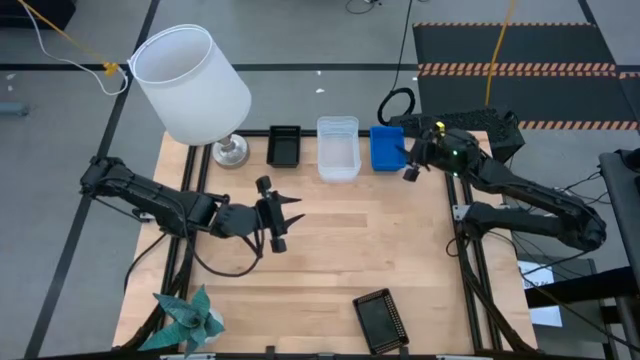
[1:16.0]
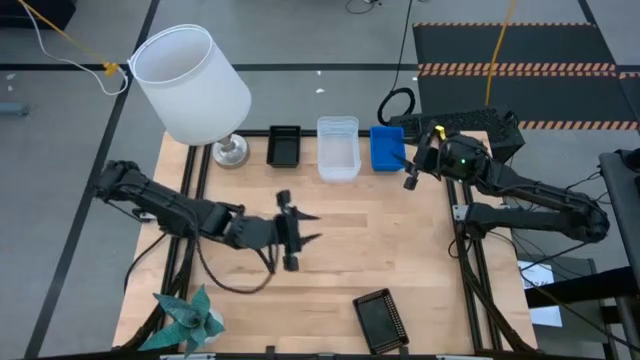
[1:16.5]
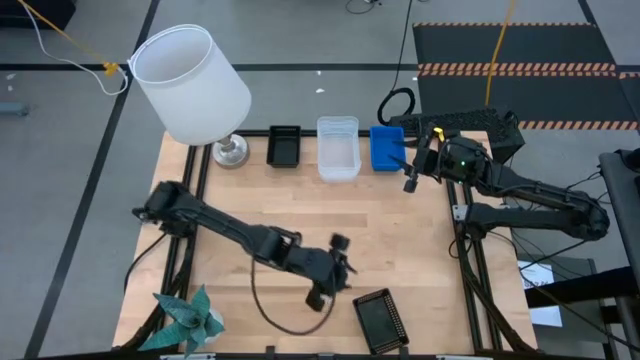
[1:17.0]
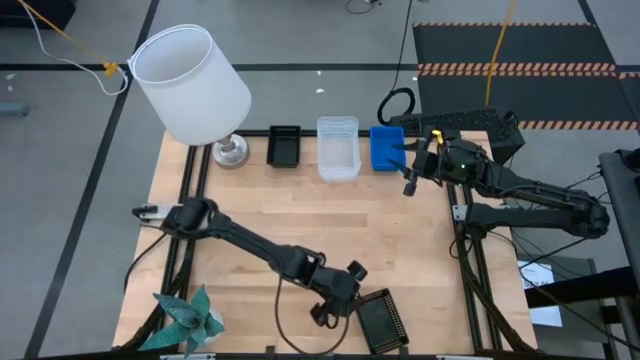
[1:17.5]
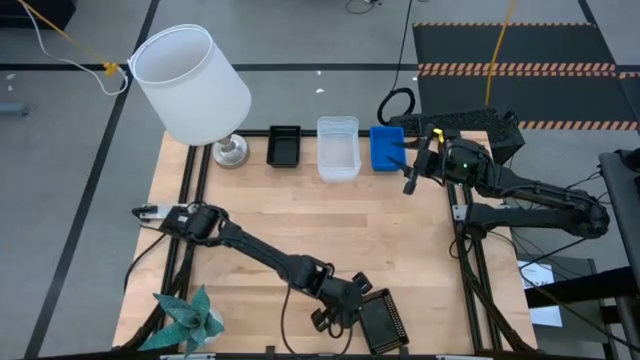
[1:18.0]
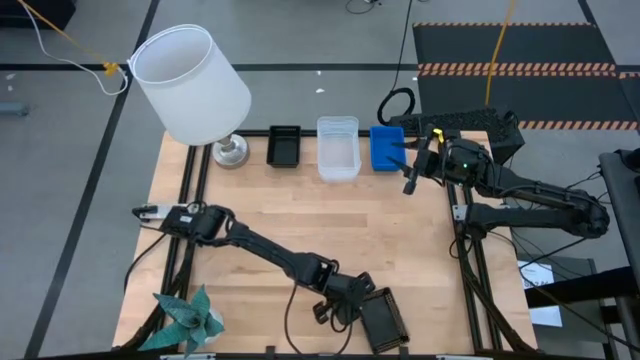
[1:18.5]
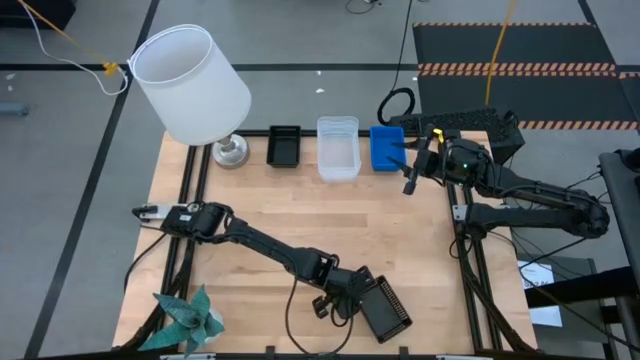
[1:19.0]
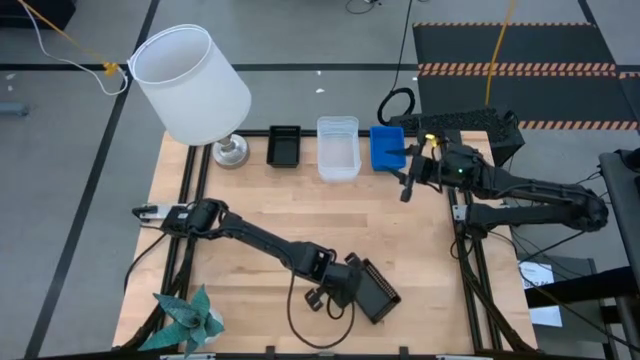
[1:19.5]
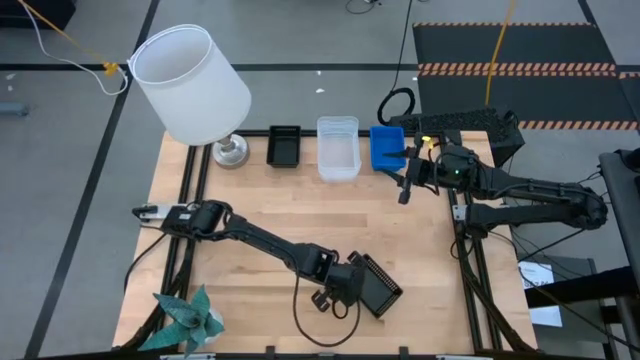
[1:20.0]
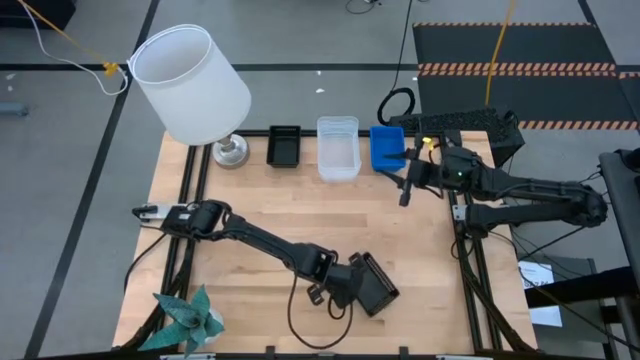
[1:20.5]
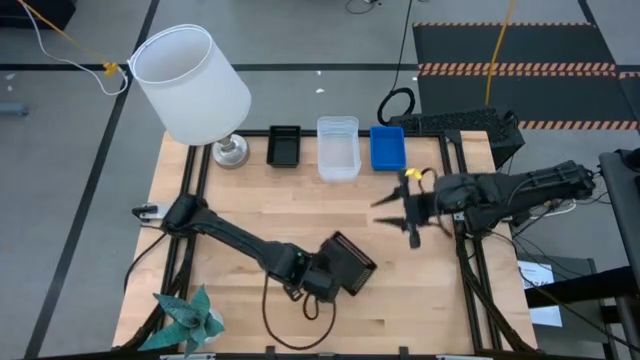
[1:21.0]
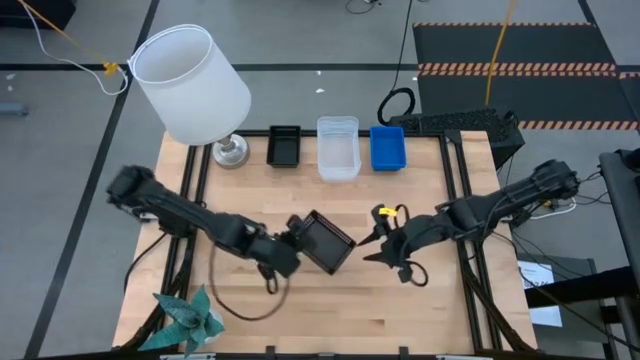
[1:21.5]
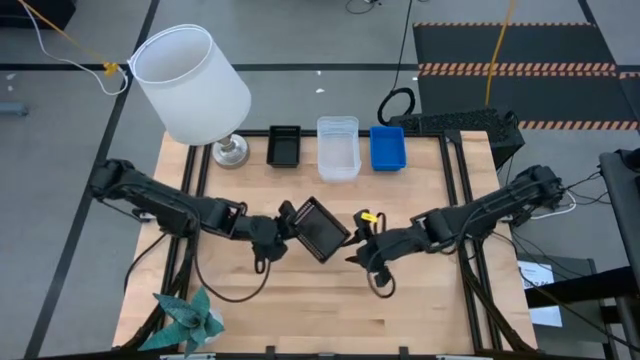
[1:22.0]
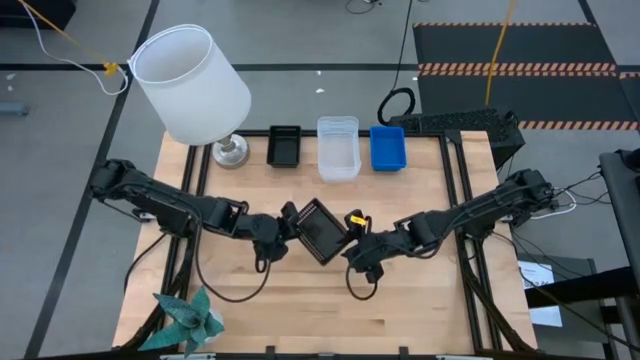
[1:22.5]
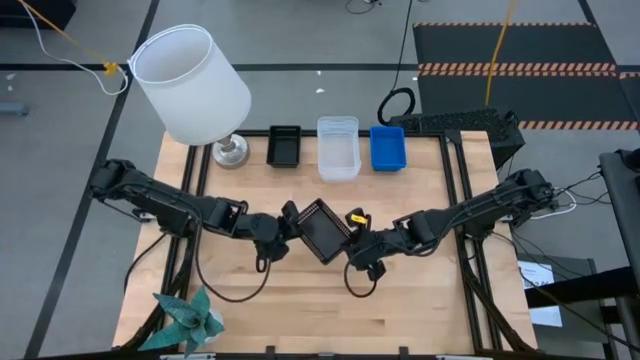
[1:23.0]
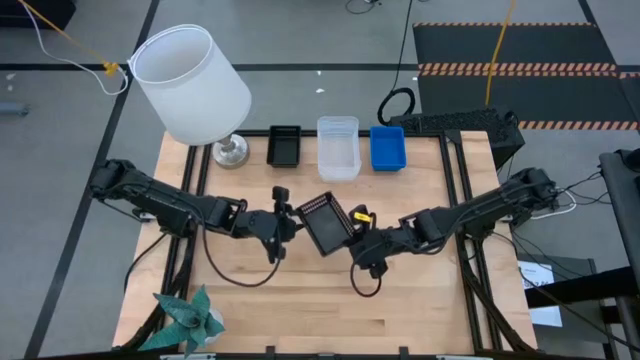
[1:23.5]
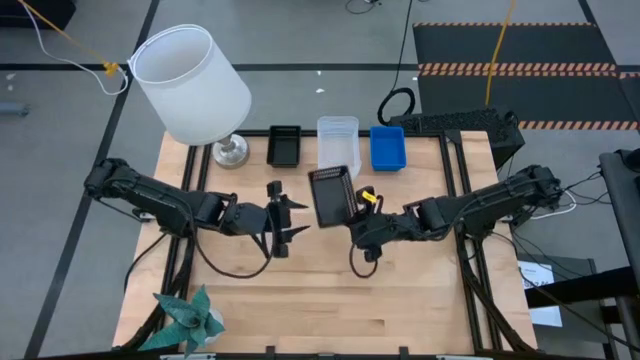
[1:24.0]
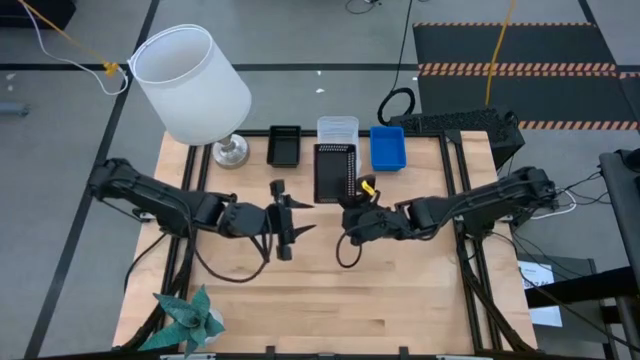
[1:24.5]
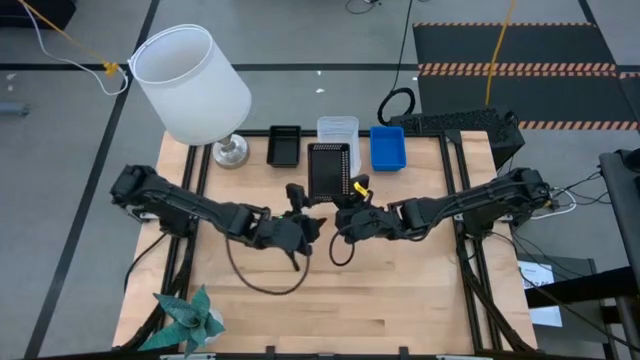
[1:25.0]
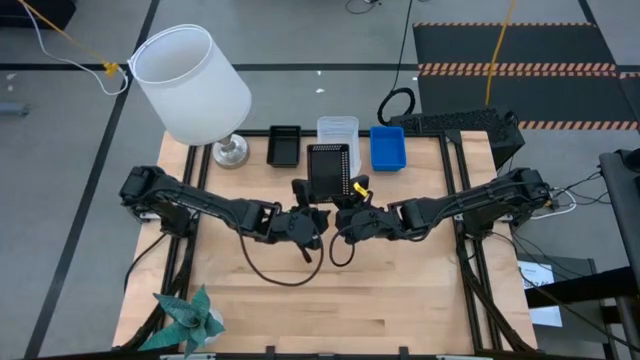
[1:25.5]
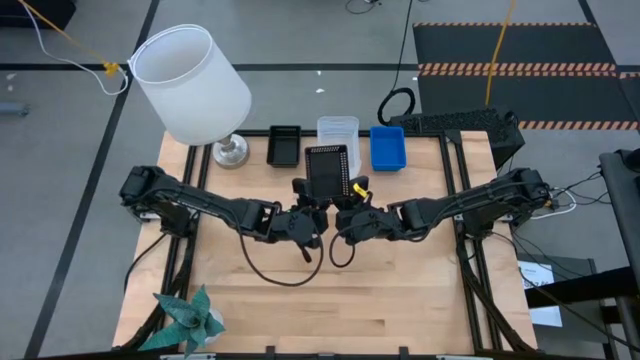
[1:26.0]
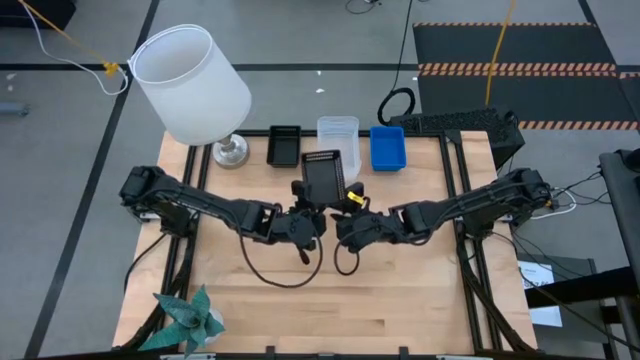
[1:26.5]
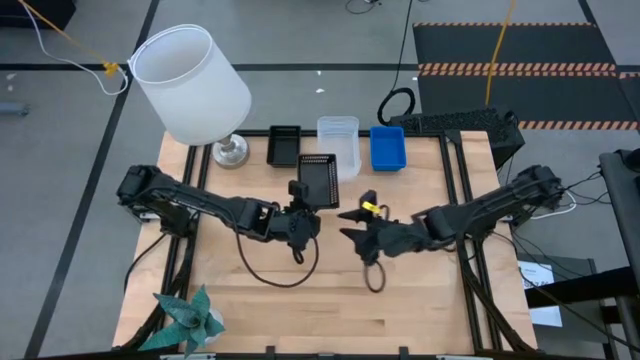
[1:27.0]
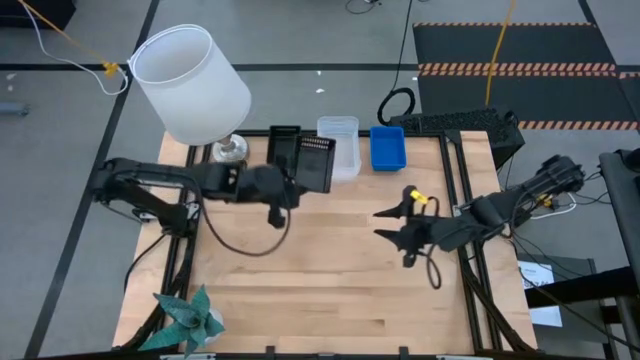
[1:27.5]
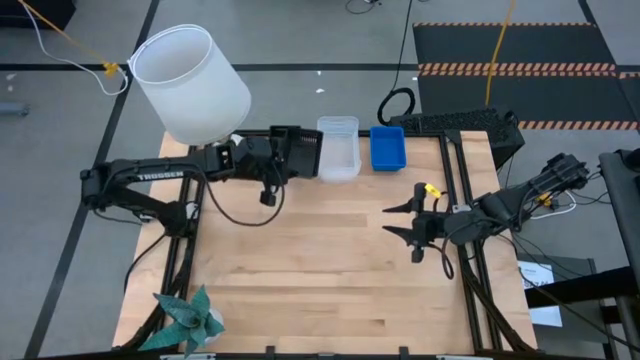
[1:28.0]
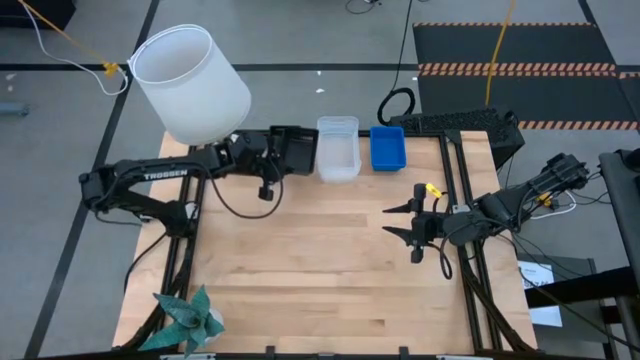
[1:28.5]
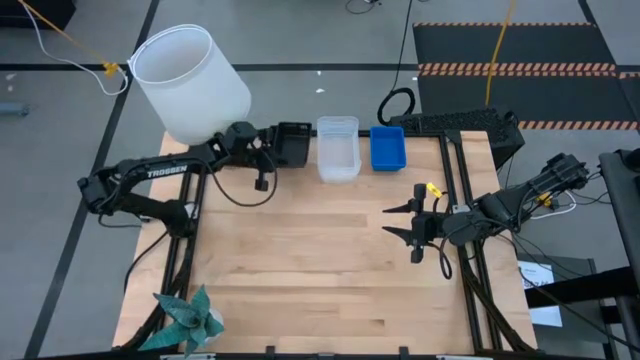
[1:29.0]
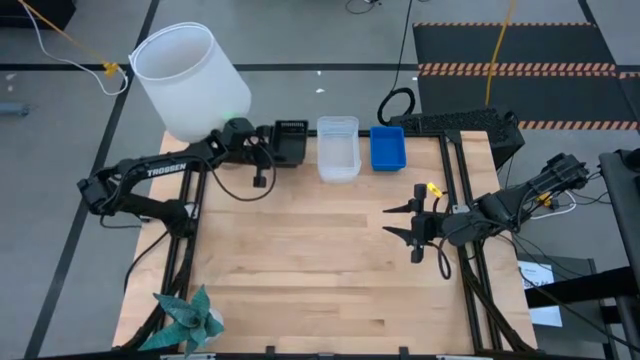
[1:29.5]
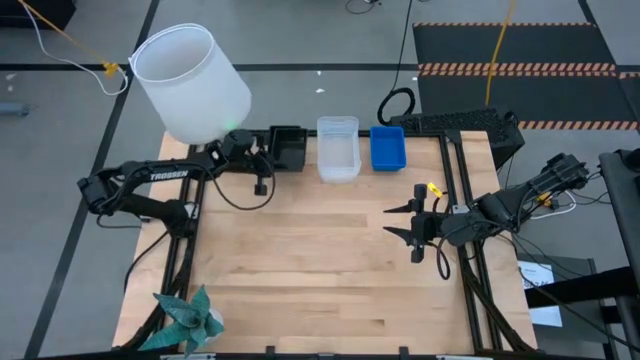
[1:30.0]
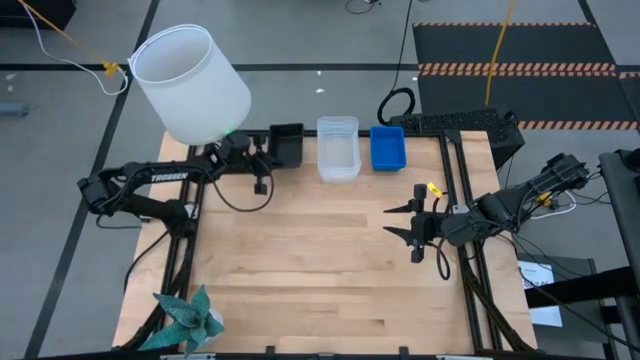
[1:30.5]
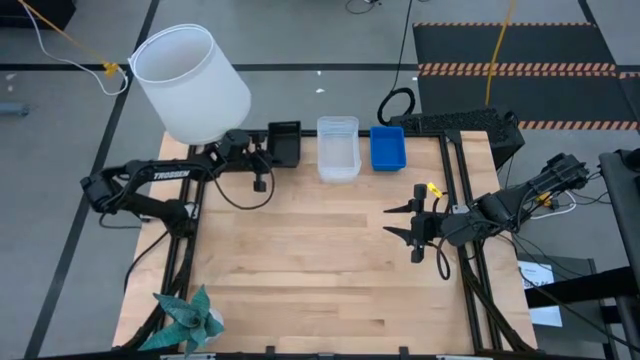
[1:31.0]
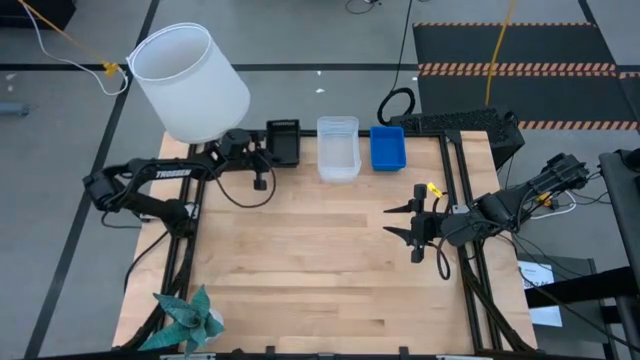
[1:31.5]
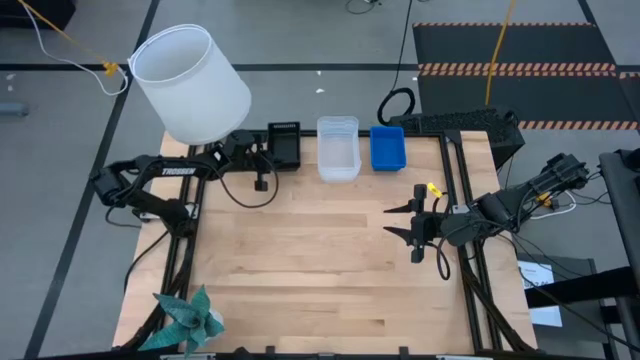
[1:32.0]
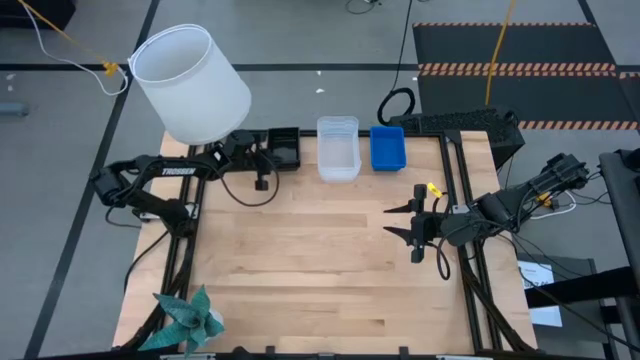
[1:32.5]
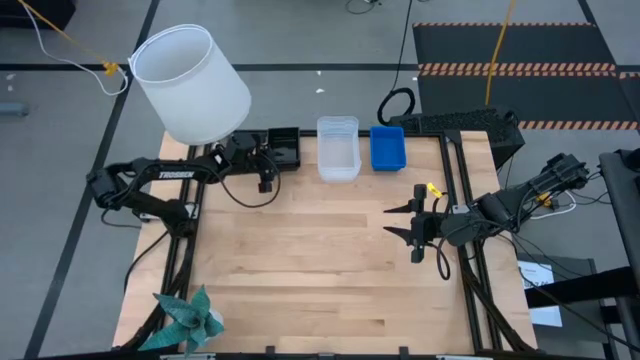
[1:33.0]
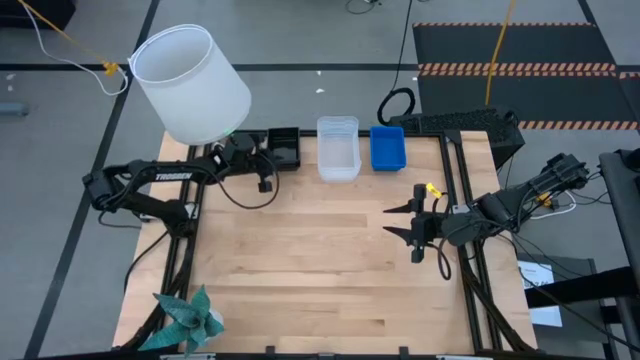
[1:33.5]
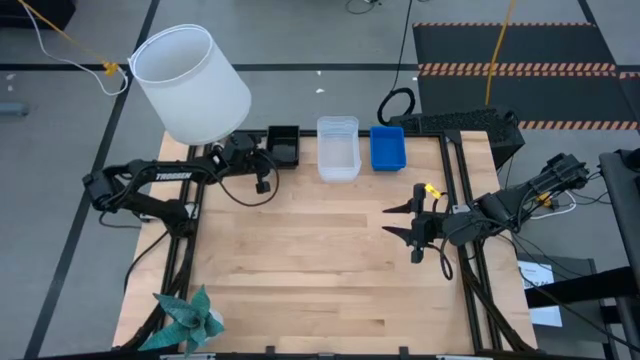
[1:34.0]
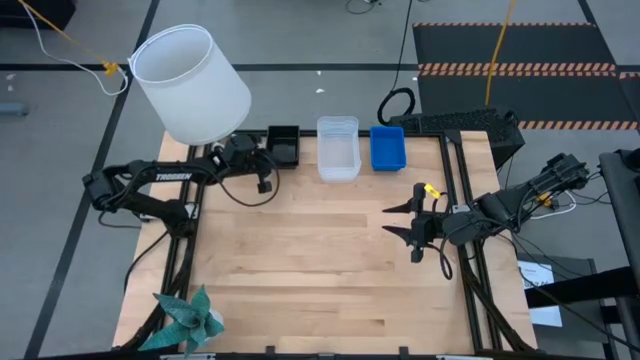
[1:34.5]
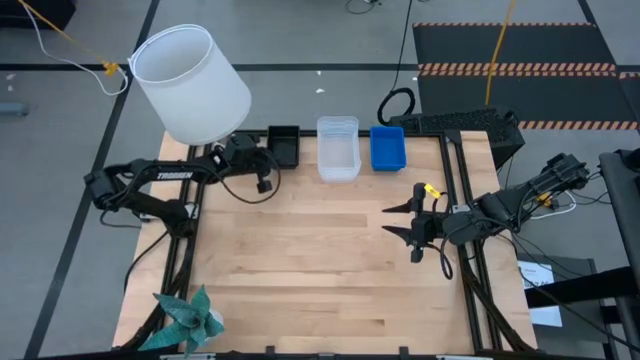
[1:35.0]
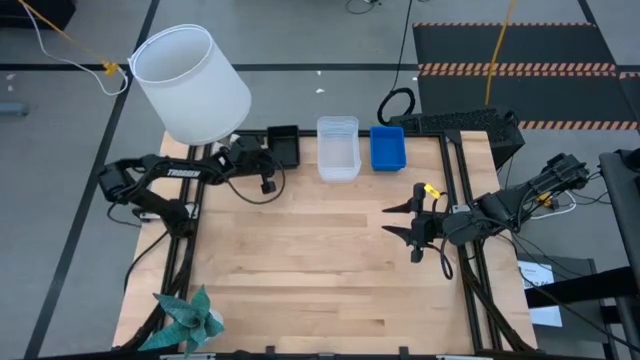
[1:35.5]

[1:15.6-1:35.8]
Stack the bottom black bin on the stacked black bins
